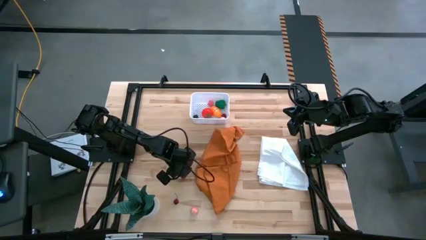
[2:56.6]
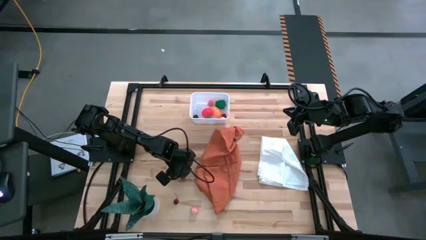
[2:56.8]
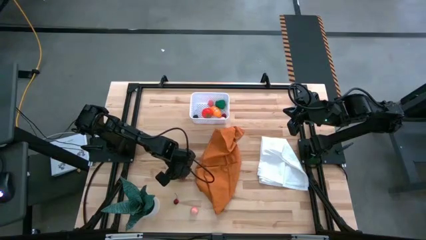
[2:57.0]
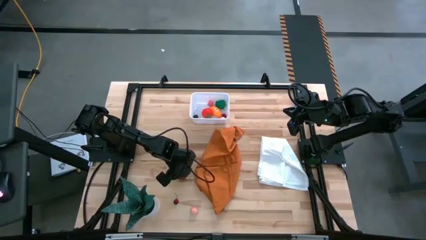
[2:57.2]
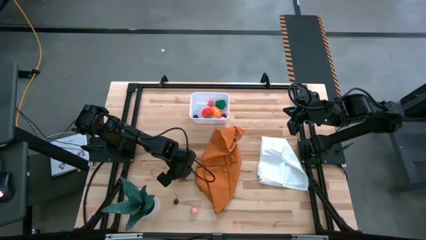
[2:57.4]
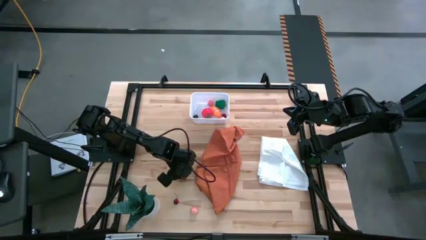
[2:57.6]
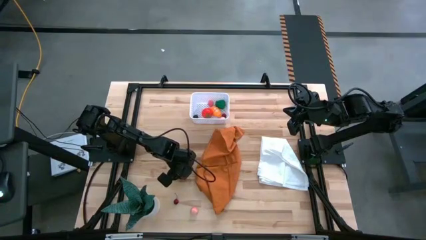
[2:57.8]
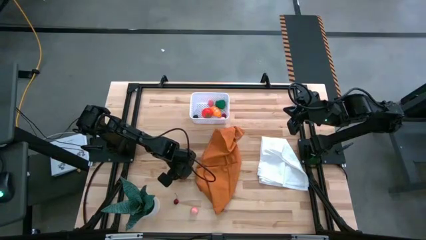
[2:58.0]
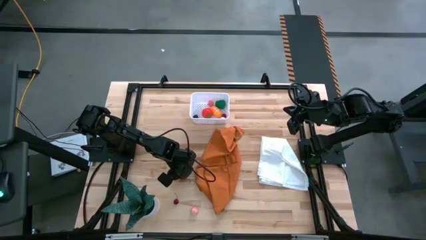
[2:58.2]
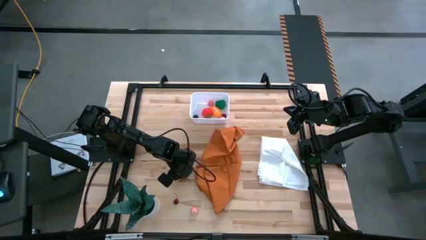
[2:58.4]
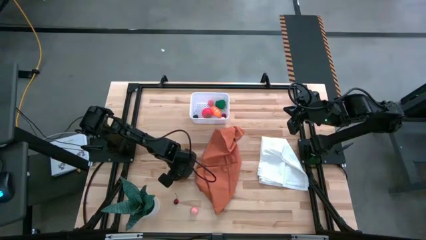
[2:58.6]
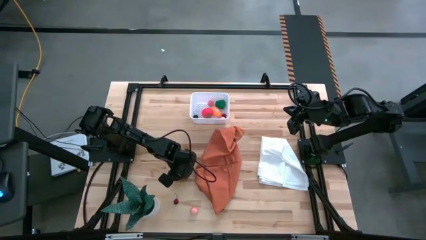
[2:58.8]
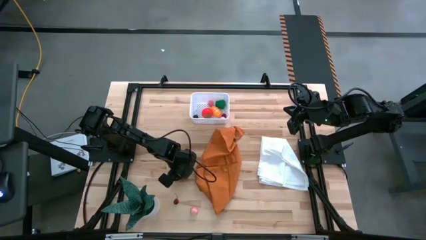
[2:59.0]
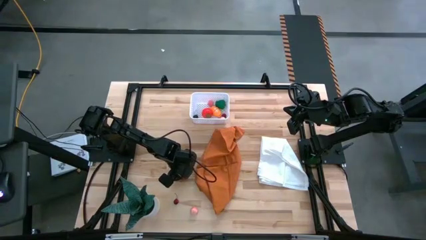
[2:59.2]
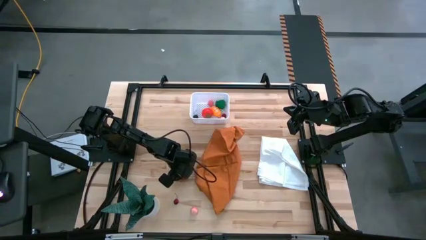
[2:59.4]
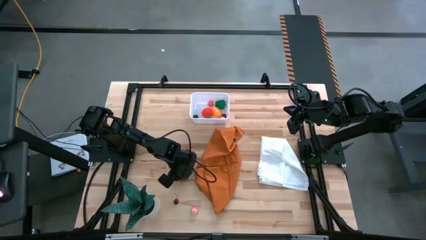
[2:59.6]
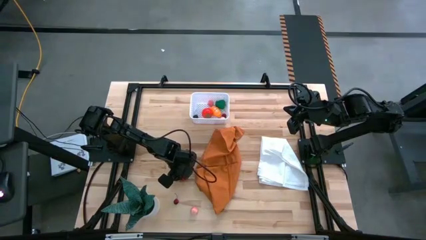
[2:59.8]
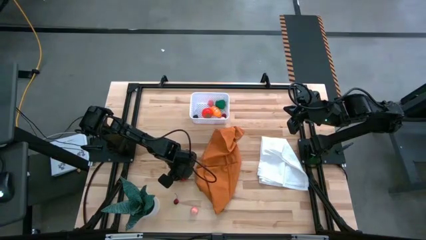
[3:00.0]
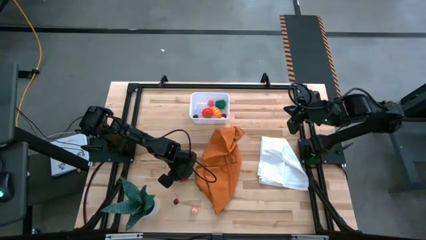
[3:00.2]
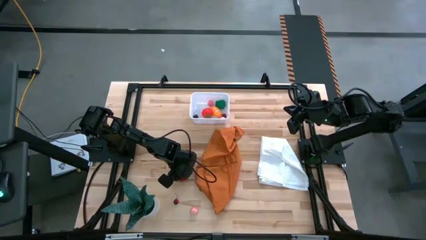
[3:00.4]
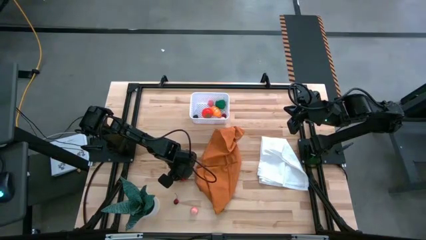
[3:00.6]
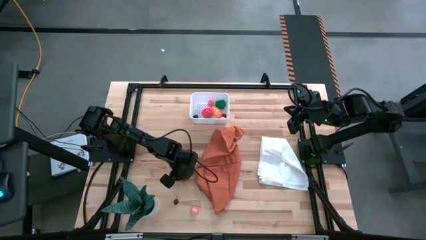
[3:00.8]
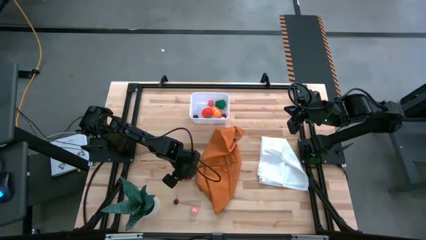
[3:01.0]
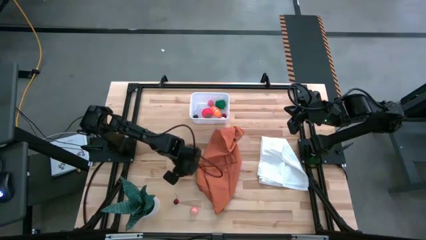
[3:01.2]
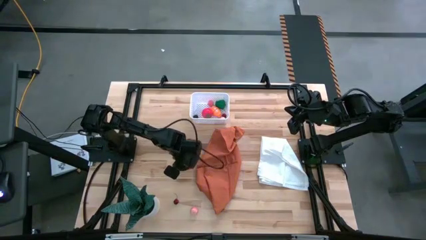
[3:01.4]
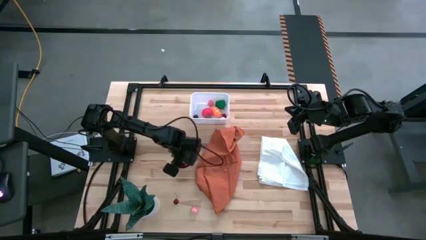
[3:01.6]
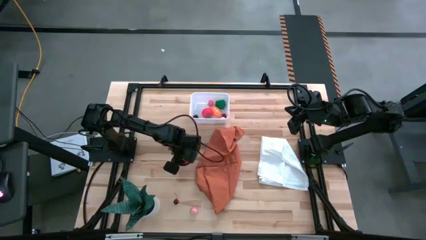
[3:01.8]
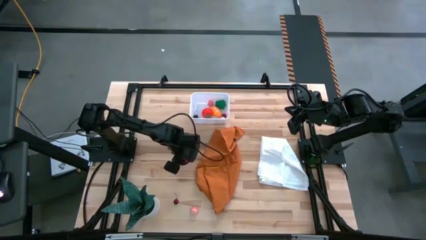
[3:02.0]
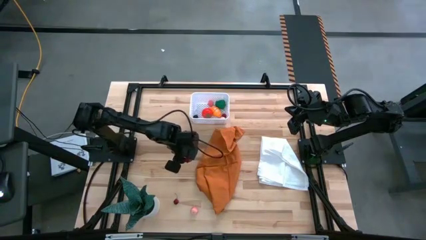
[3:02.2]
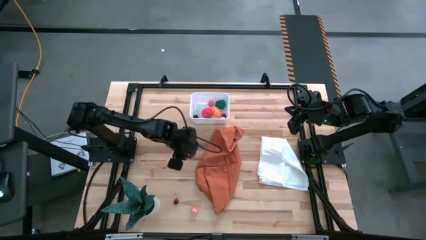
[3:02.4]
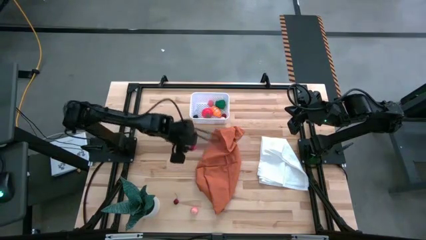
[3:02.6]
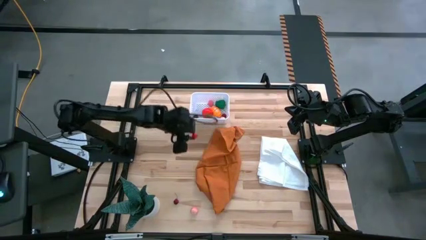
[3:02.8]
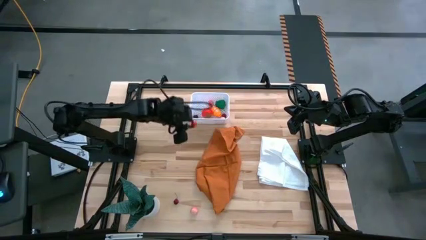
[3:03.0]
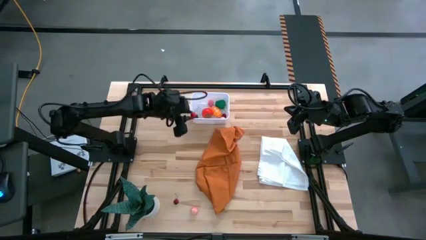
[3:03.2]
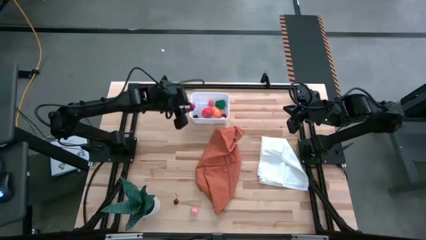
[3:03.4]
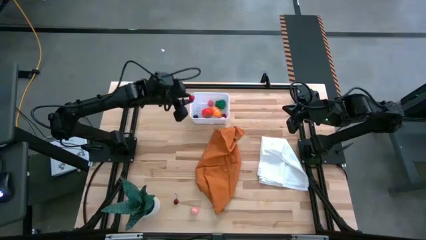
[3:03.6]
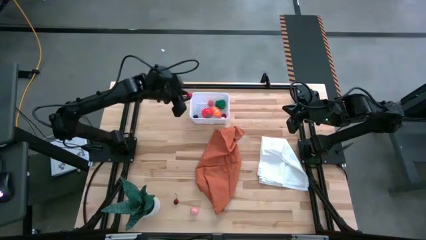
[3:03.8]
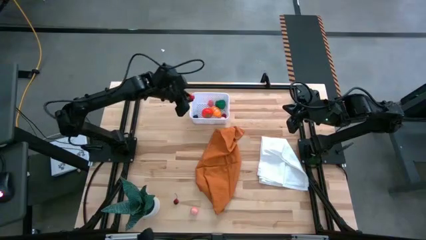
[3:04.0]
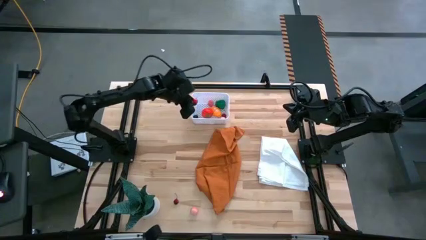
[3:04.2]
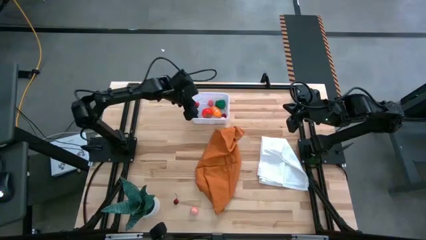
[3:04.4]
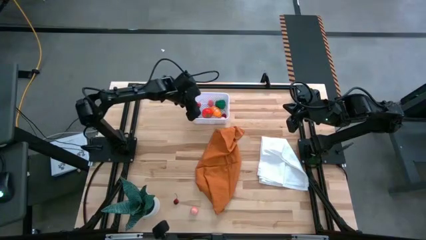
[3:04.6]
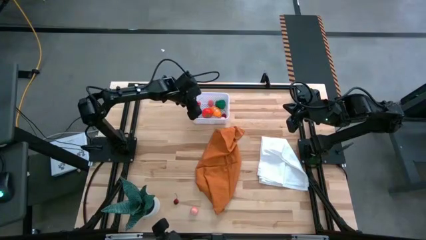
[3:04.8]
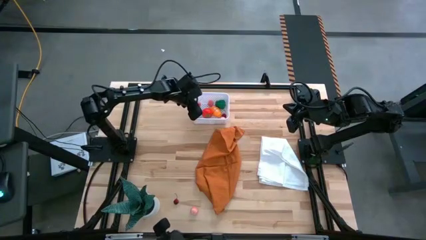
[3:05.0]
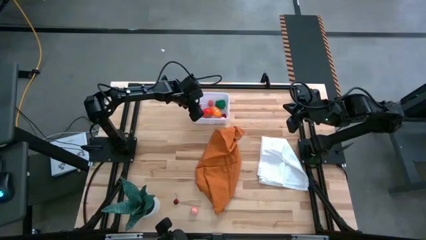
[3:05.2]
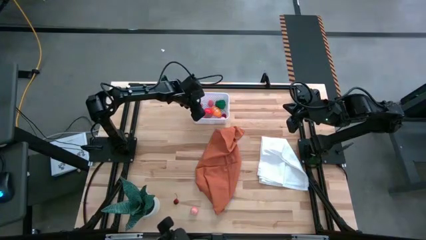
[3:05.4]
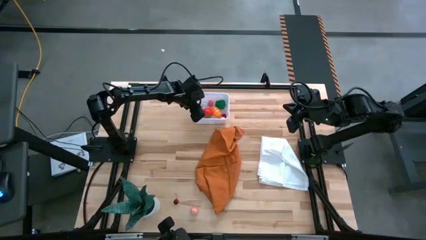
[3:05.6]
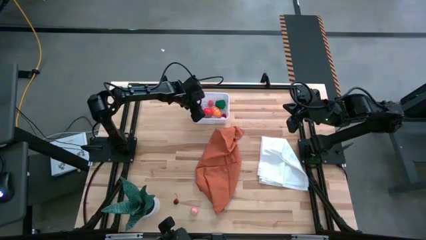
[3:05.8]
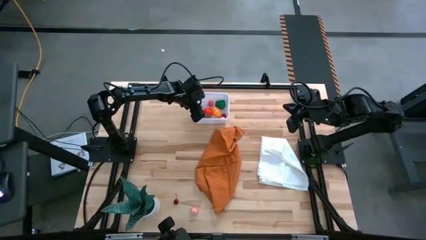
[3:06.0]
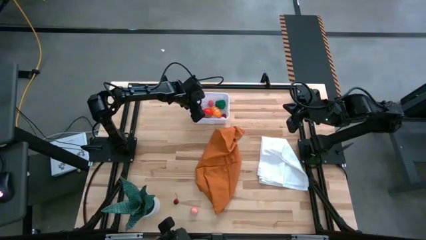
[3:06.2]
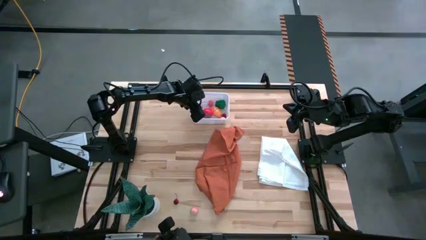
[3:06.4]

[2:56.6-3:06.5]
Task: Pick and placing Produce into tupperware
Put the top red cherry into the white basket
